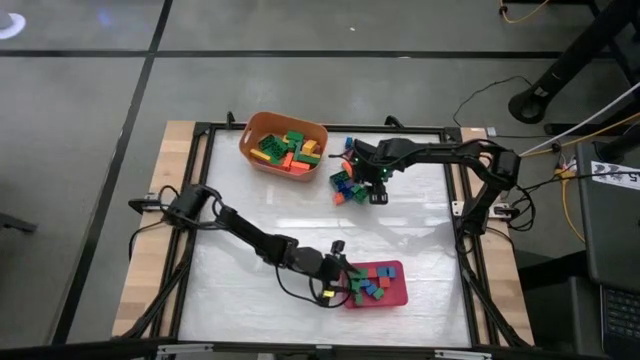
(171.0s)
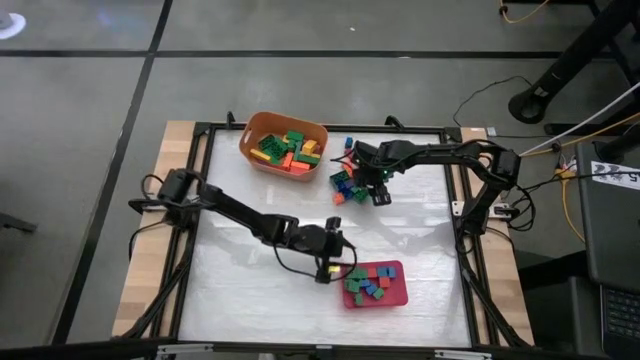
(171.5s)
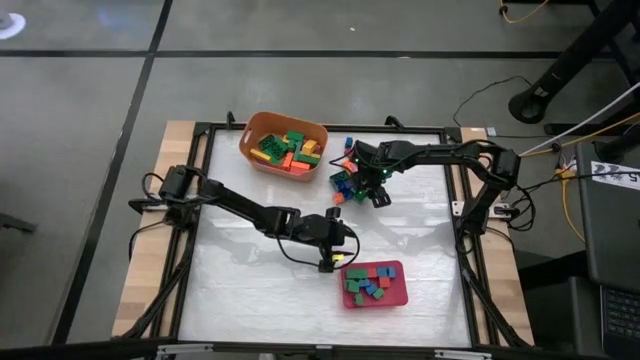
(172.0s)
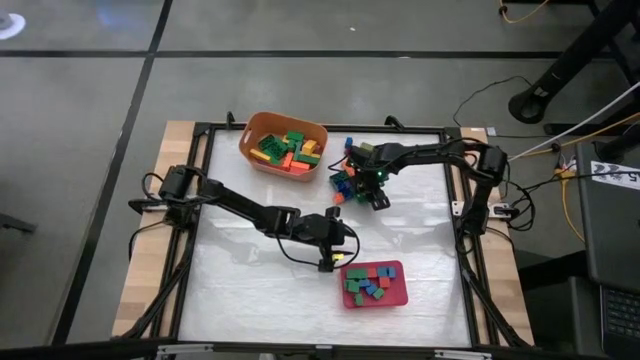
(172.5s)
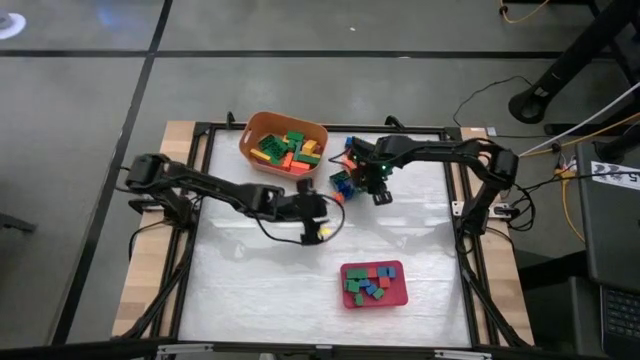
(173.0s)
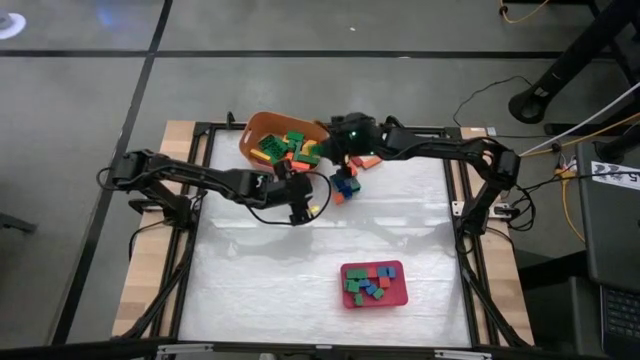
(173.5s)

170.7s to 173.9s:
Task: Sort blocks by size
Put the large green game piece into the orange bin

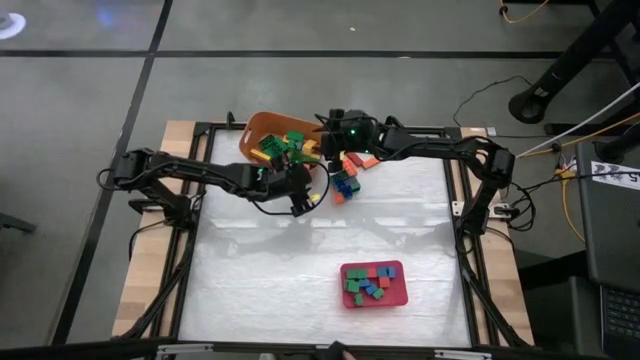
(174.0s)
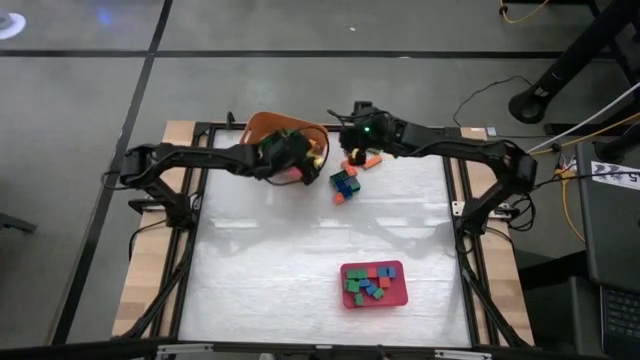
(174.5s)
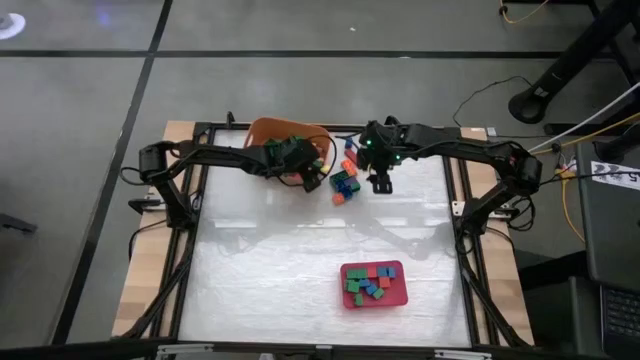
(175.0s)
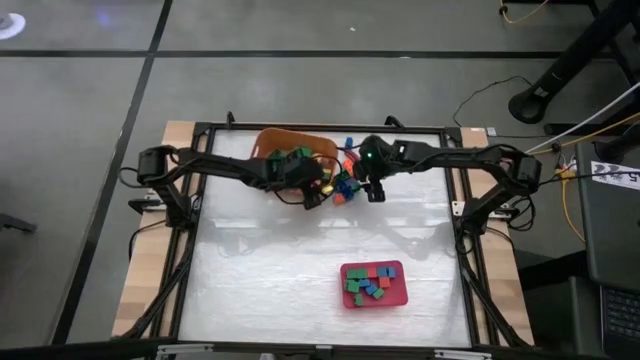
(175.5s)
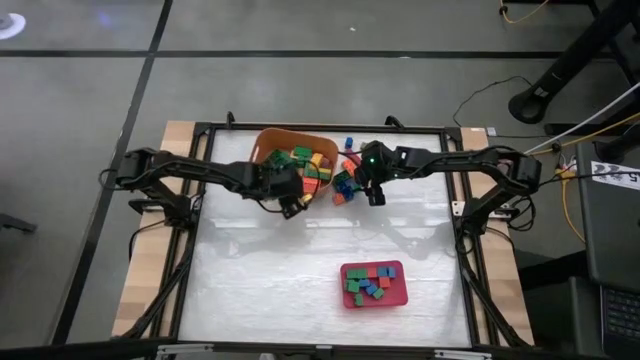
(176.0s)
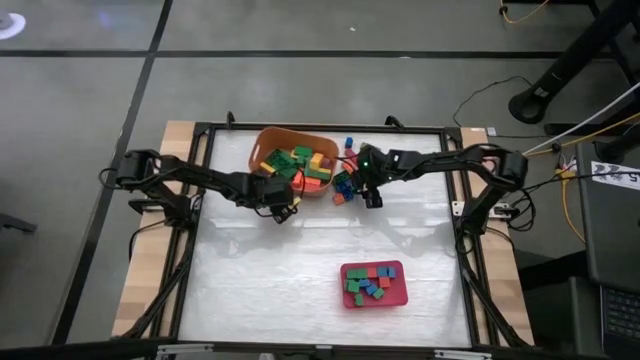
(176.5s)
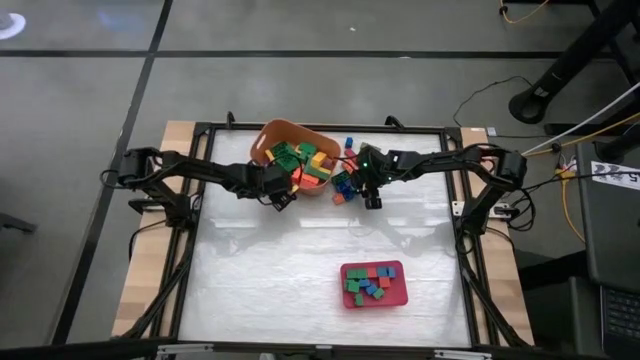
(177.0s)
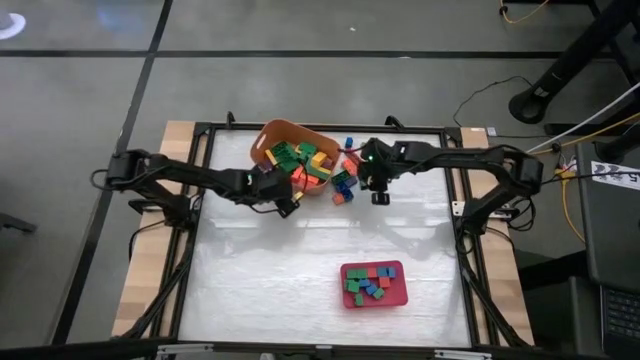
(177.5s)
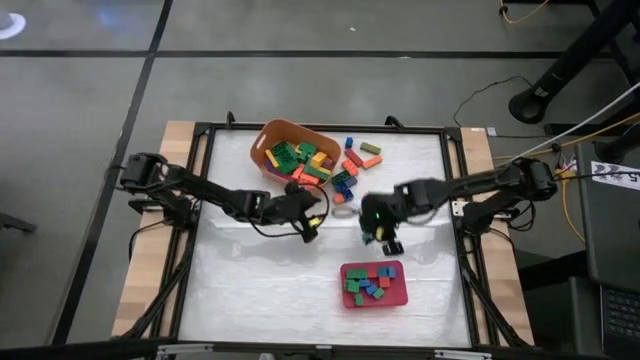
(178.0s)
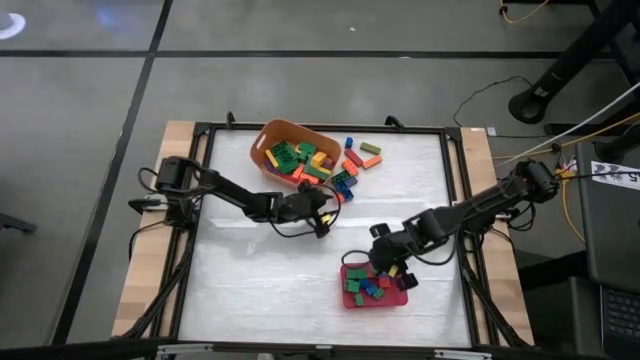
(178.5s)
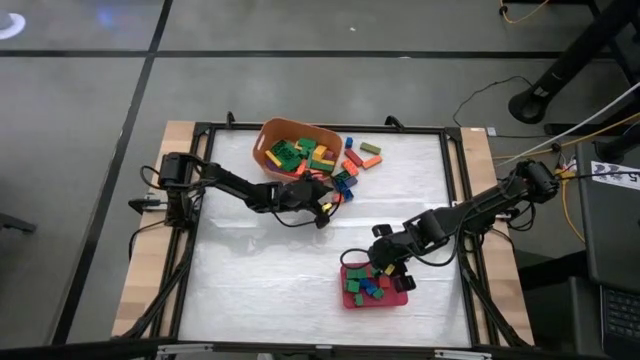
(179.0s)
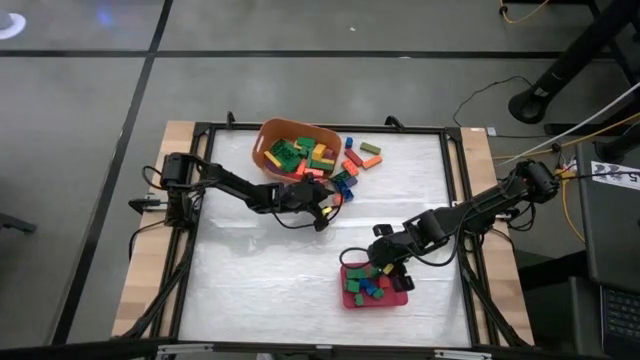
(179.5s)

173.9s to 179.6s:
Put the small green game piece into the red bin

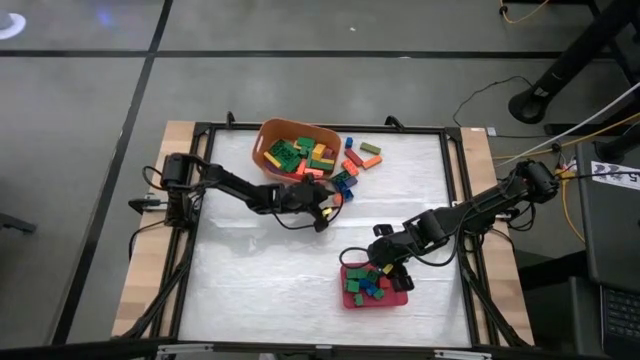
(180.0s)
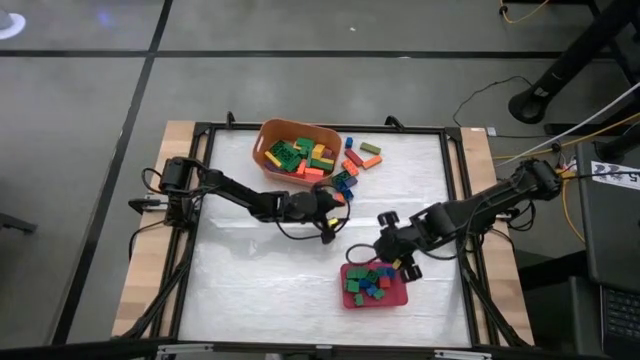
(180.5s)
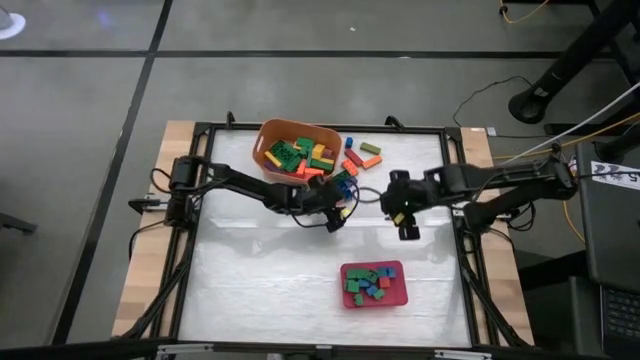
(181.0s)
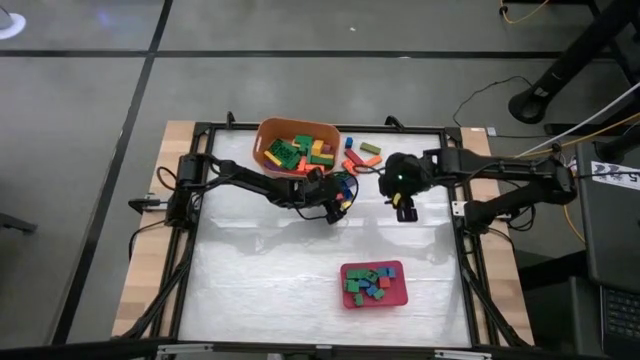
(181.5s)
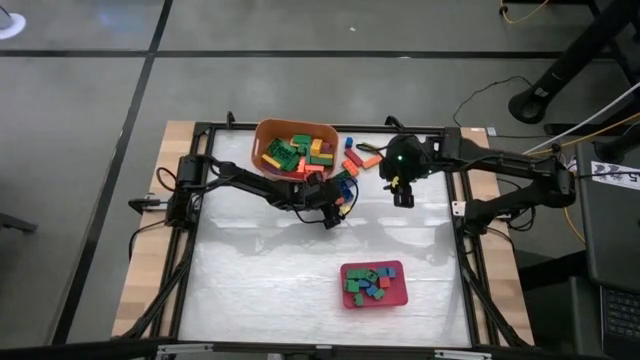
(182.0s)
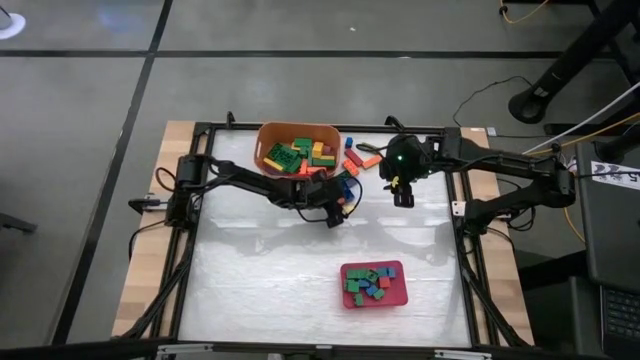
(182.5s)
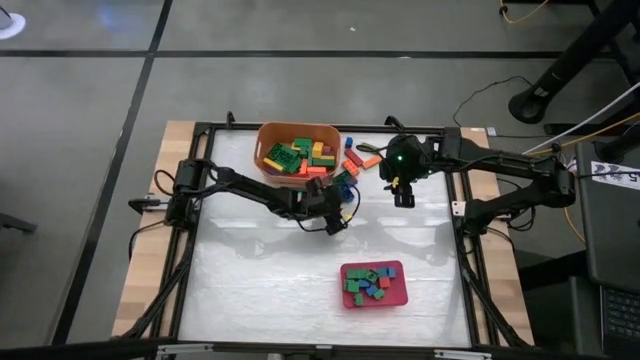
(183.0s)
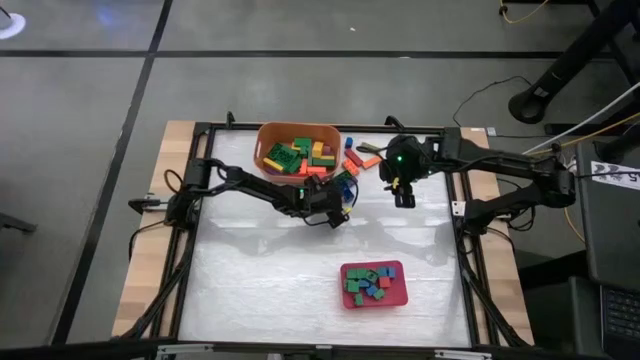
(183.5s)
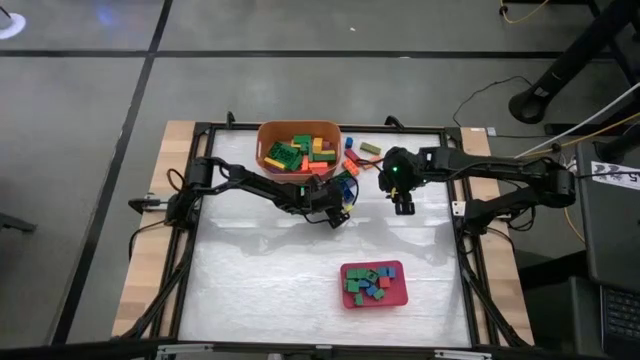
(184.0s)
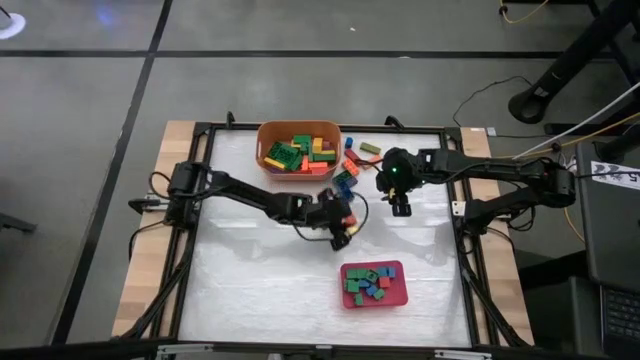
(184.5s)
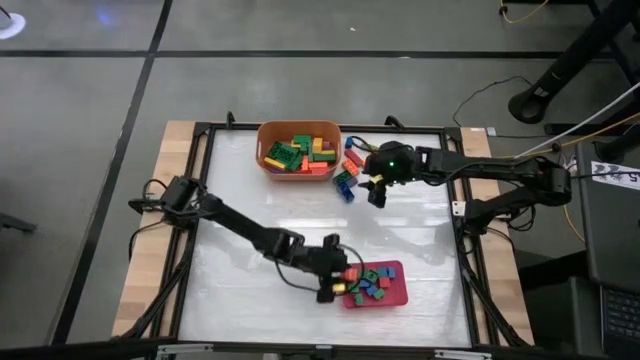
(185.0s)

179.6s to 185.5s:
Put the small orange game piece into the red bin

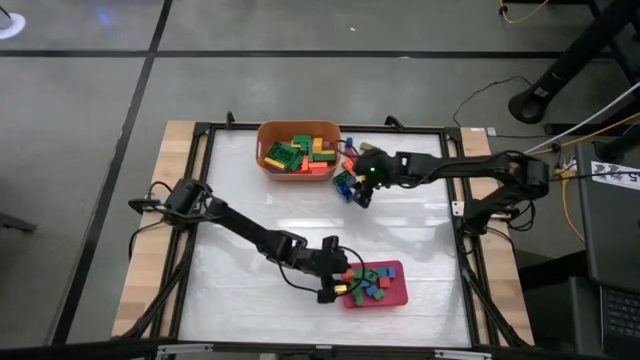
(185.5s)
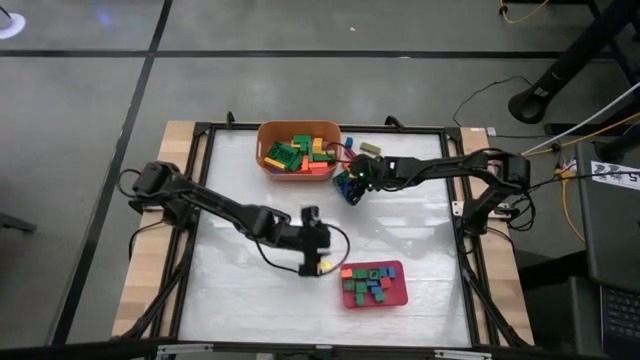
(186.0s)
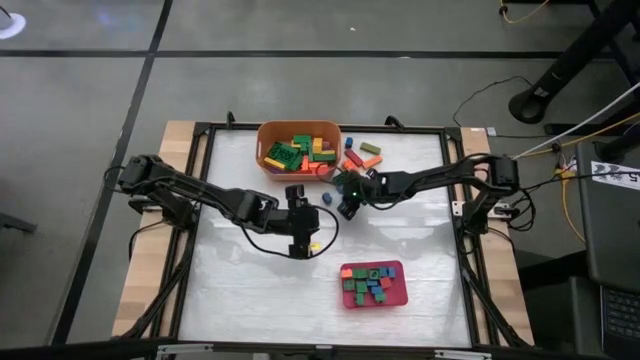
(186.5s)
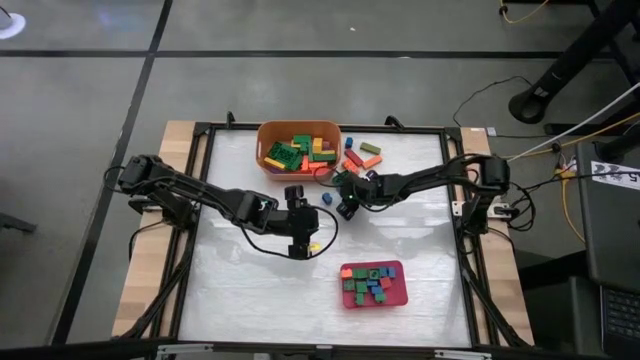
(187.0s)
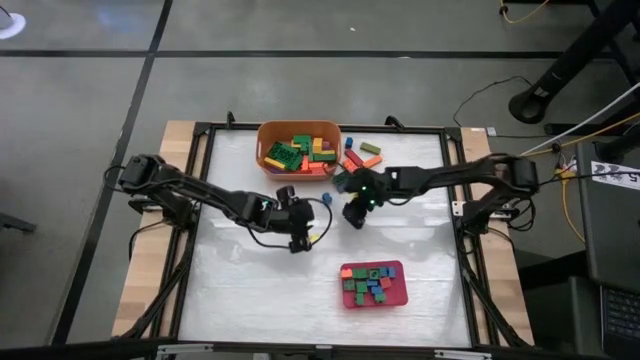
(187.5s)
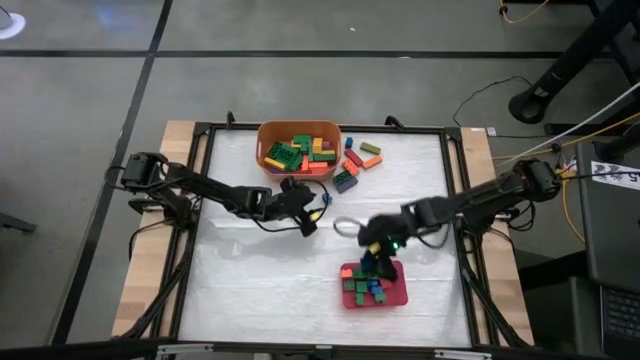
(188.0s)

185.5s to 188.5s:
Put the small blue game piece into the red bin

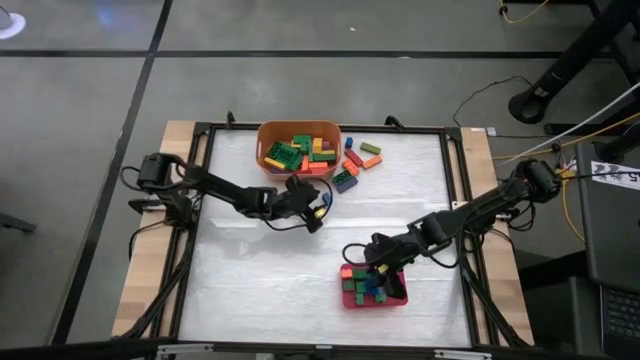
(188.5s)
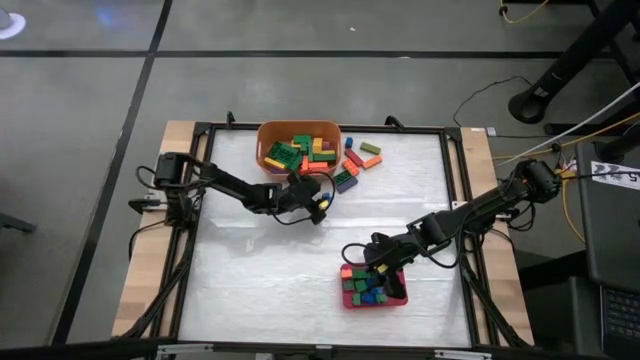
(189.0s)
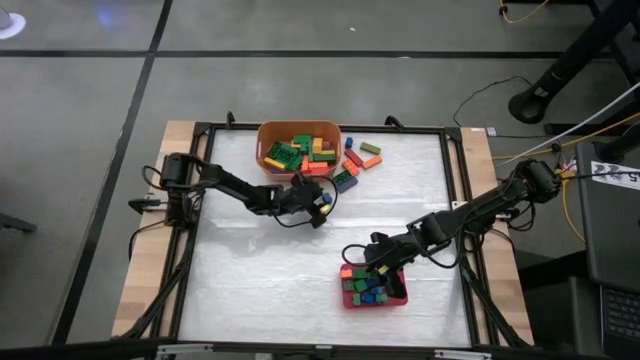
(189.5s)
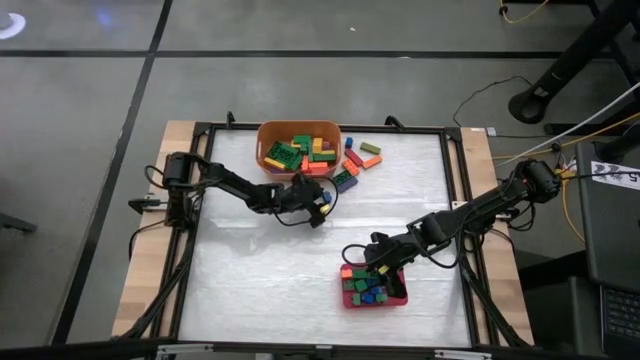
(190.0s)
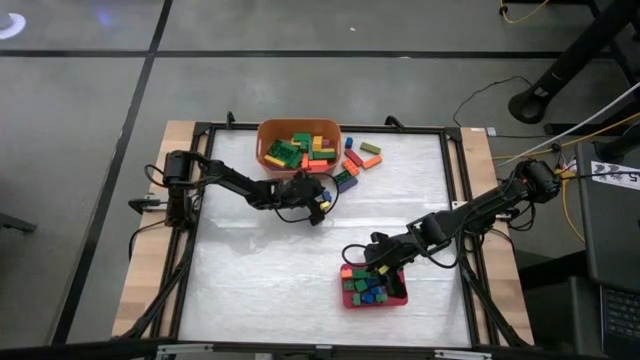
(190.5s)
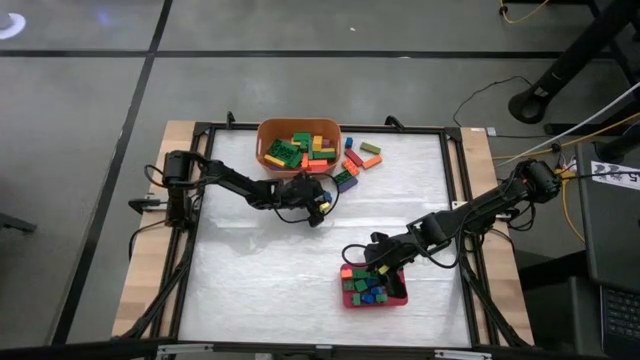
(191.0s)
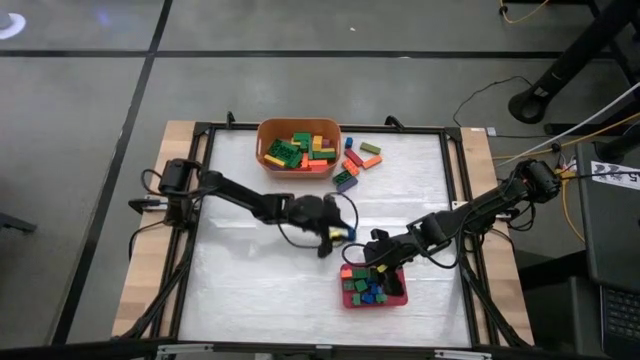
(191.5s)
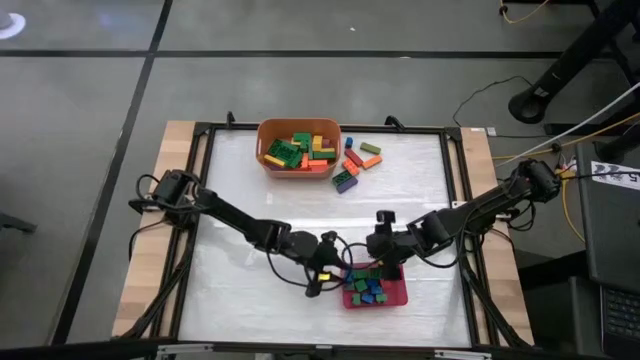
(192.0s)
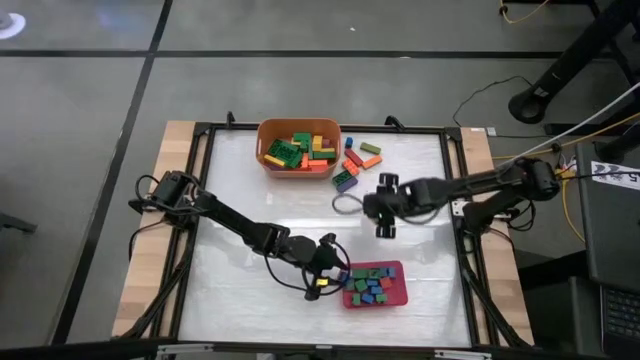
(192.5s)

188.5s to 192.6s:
Put the small blue game piece into the red bin
